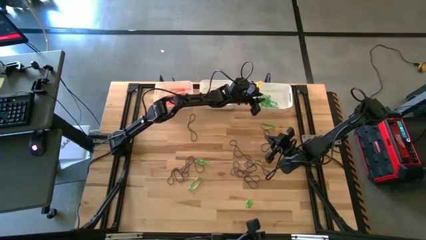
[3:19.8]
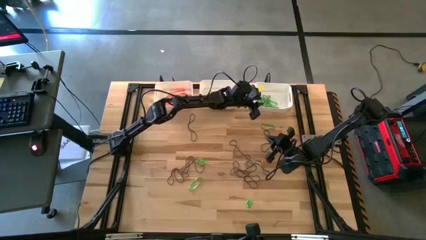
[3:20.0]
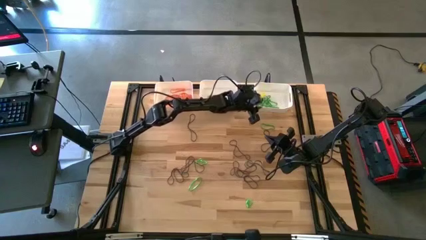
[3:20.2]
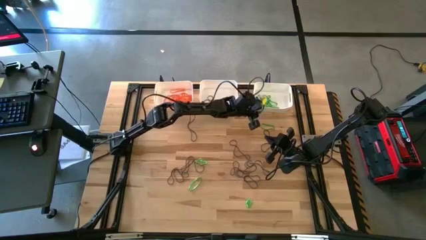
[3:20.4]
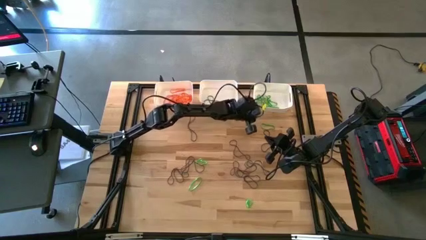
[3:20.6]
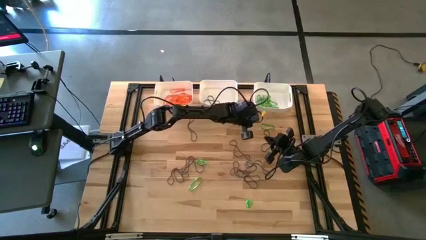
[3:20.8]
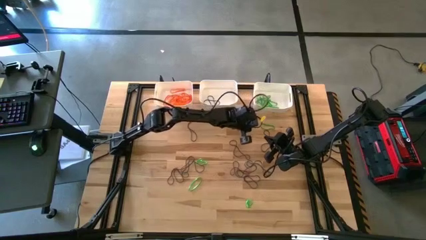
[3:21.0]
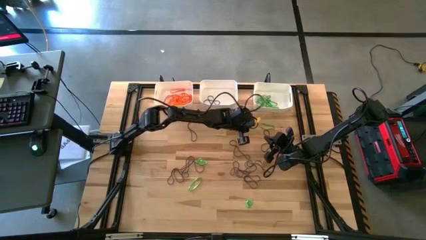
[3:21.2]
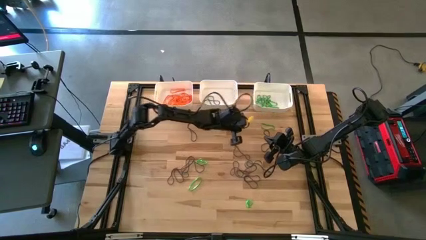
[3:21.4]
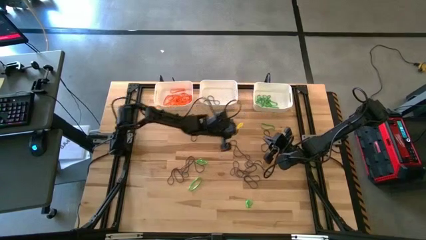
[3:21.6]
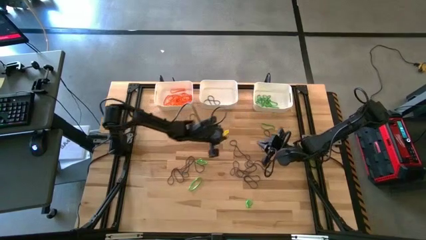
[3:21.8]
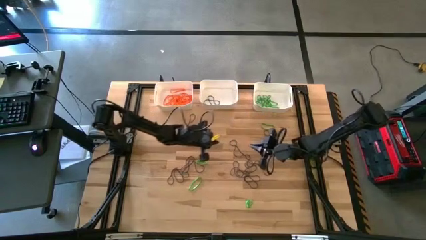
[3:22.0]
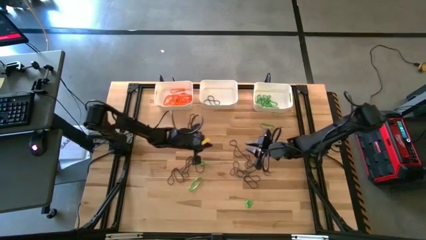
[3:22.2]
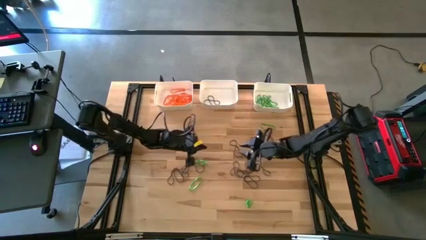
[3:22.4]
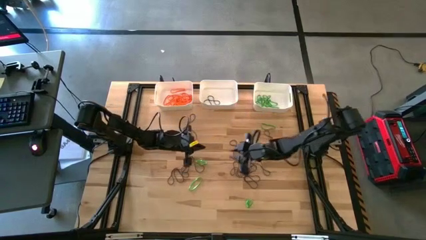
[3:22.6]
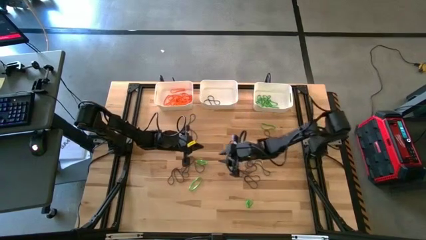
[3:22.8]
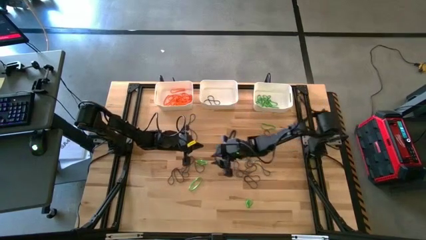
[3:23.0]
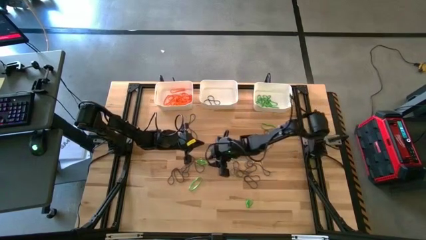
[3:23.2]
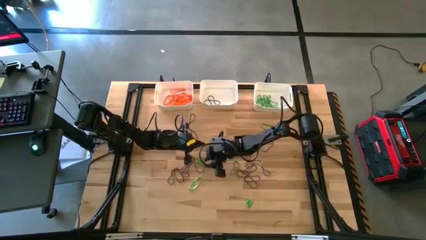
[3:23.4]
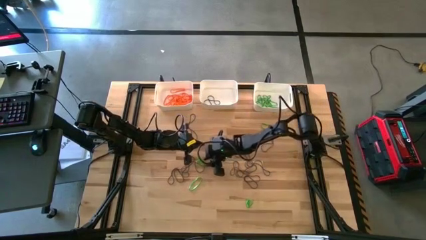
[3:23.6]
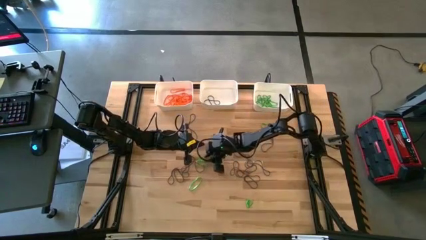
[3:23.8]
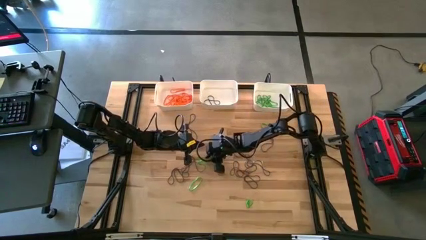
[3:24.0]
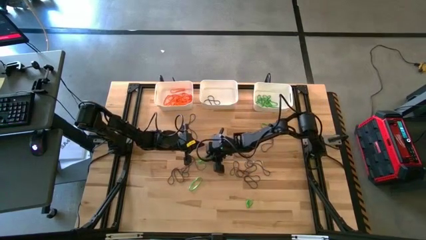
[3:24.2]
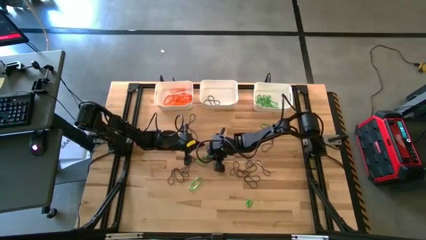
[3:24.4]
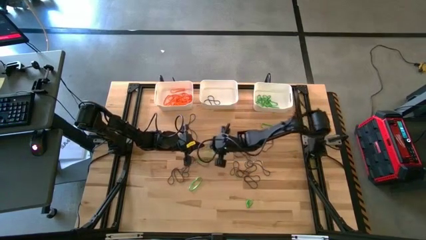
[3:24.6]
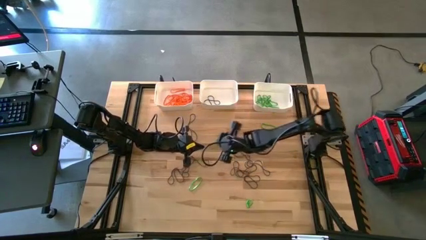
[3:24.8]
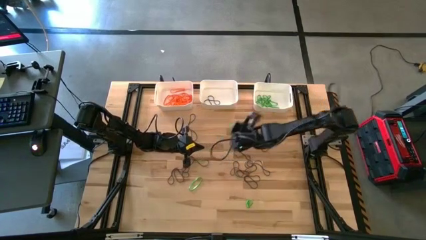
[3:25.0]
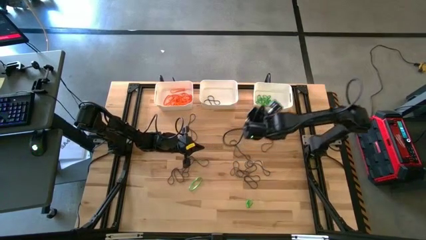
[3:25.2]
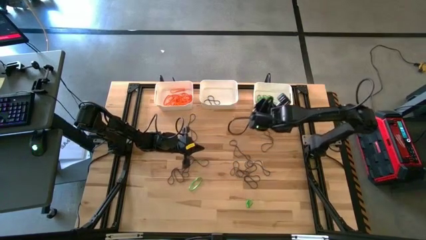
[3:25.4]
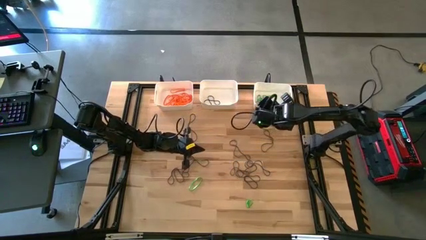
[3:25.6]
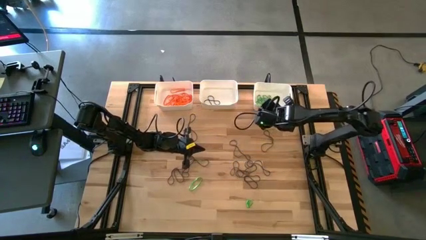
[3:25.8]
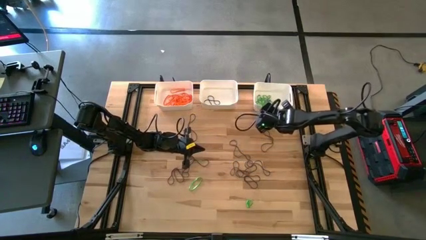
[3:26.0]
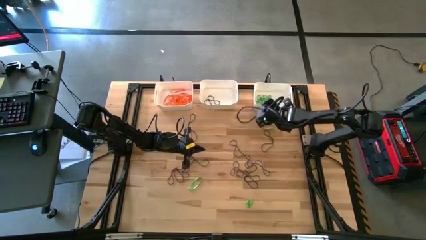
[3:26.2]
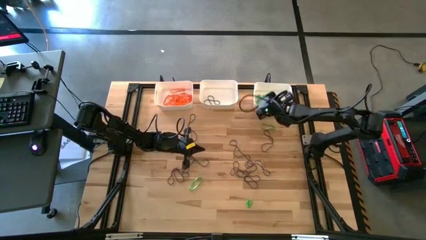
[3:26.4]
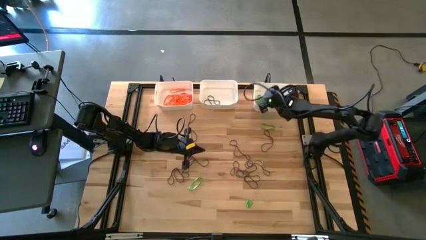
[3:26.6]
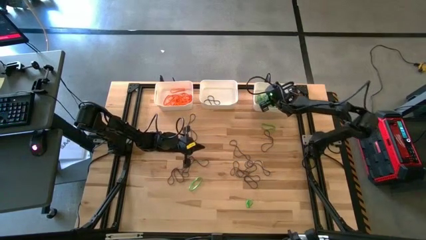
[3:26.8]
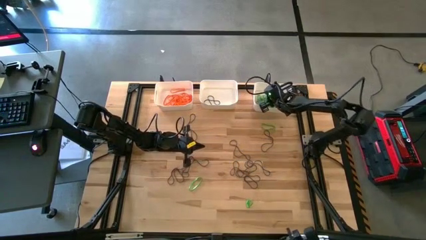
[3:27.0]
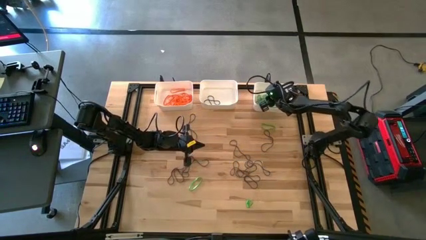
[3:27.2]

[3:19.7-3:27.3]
Task: Sort rubber bands into baskets
Put the green rubber band into the right white bin

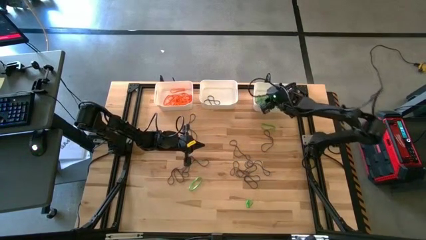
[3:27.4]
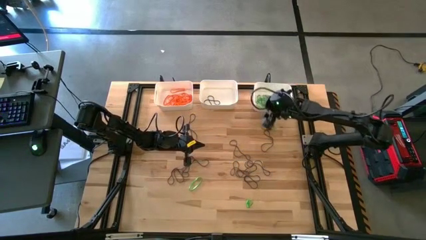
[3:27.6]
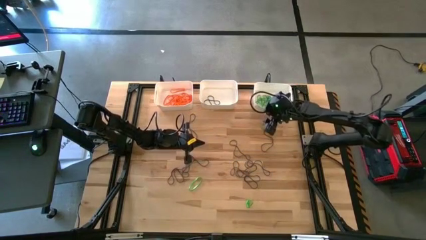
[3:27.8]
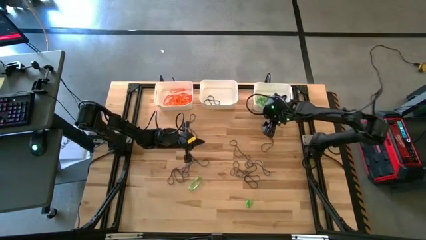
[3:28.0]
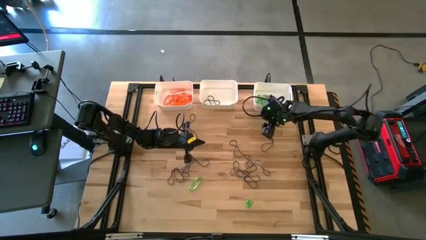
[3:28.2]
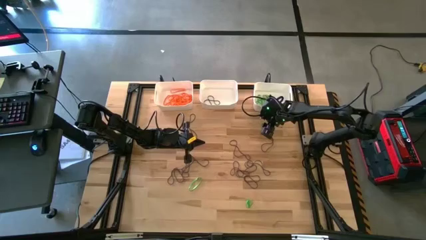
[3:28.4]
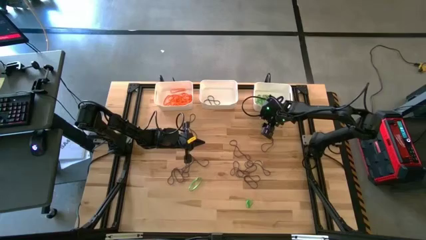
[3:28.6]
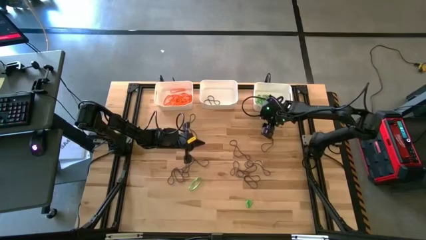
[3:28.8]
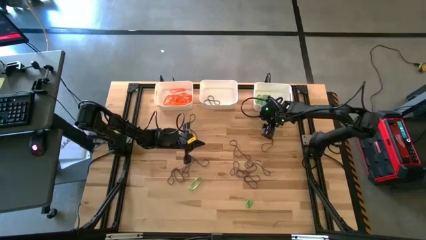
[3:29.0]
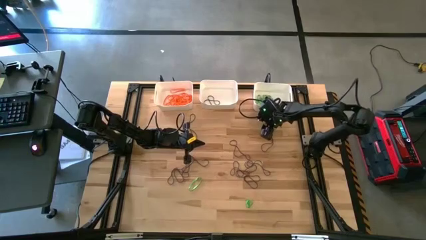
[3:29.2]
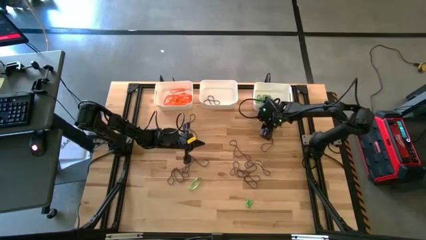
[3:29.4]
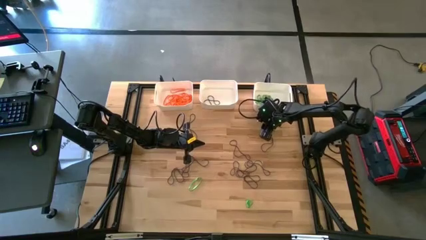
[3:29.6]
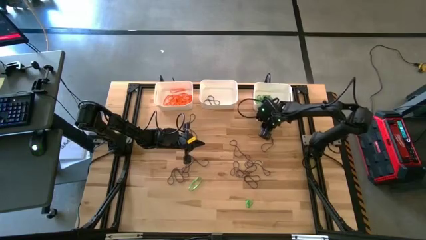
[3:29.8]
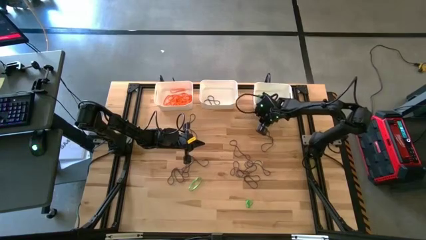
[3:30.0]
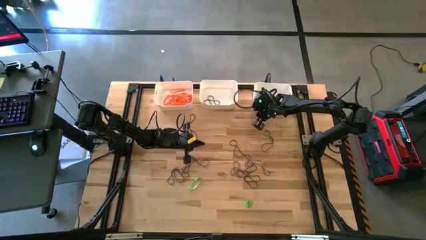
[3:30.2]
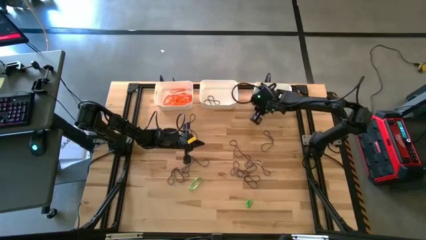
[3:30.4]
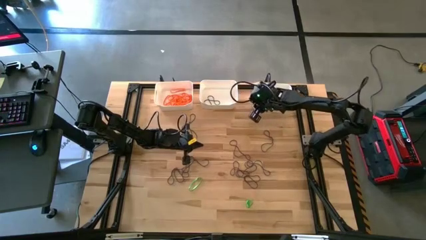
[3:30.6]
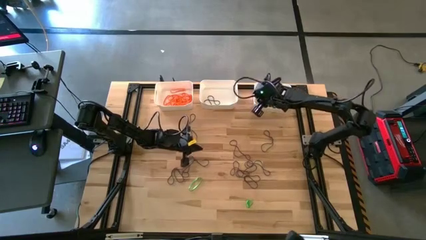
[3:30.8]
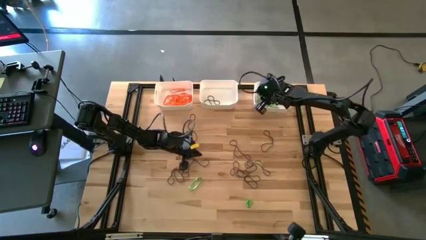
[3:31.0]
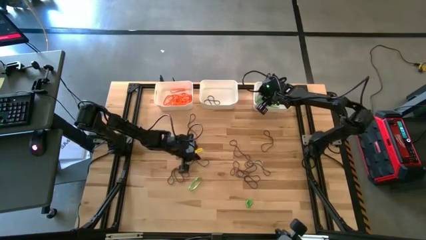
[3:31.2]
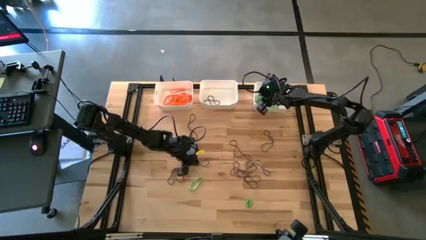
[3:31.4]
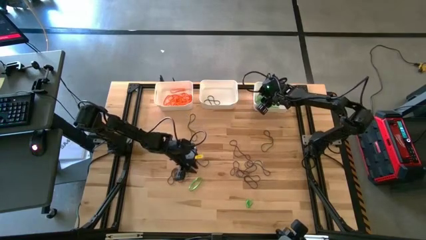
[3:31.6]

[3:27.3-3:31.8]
Put the green rubber band into the right white bin

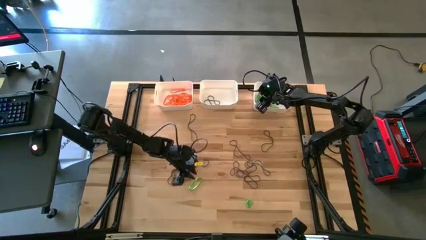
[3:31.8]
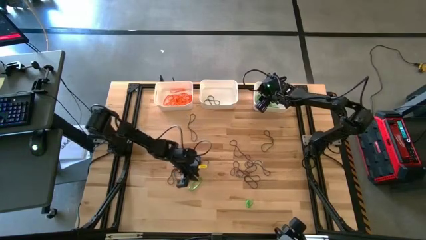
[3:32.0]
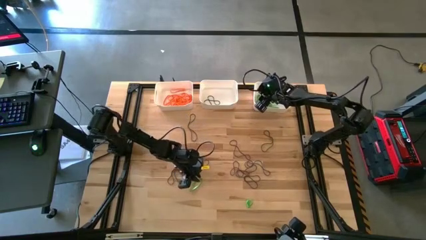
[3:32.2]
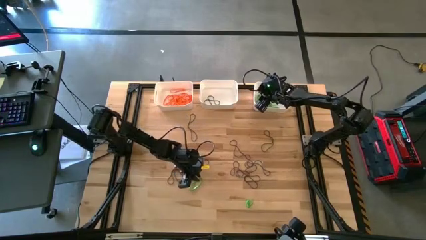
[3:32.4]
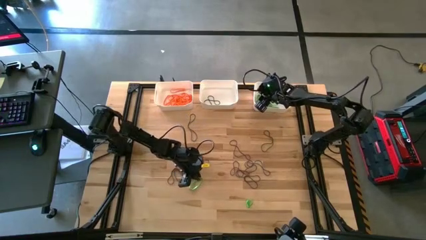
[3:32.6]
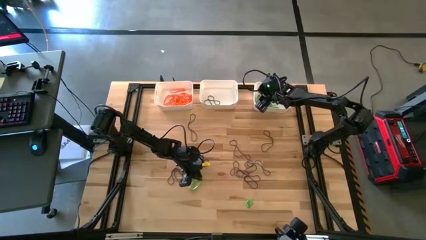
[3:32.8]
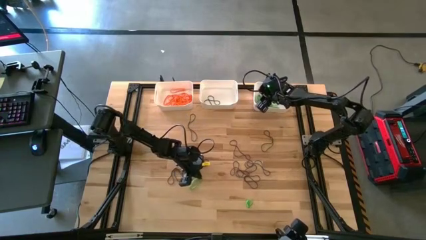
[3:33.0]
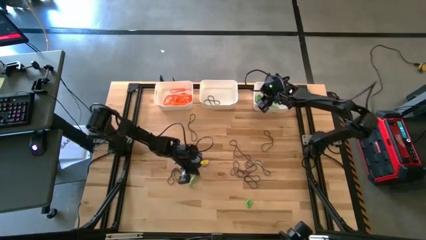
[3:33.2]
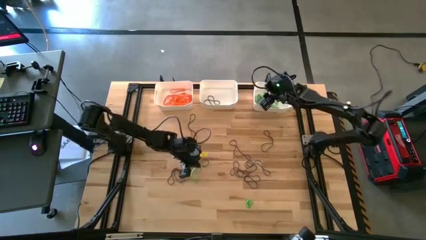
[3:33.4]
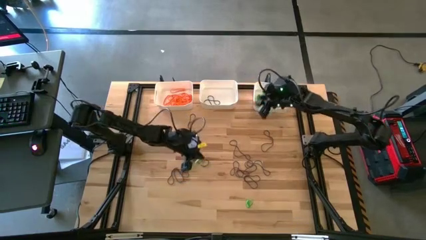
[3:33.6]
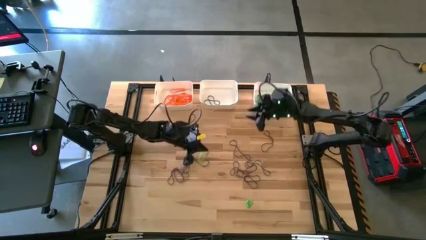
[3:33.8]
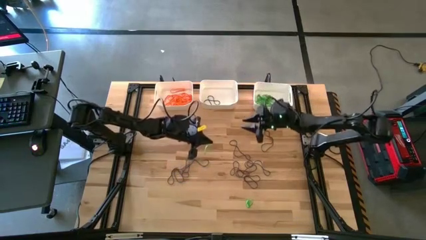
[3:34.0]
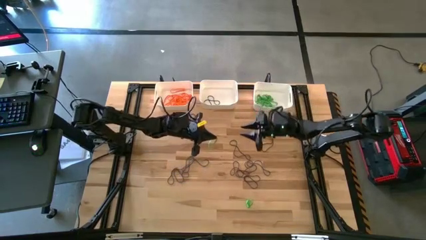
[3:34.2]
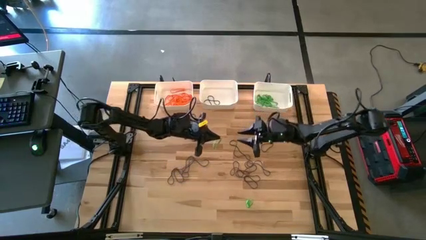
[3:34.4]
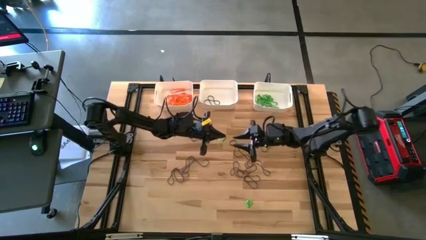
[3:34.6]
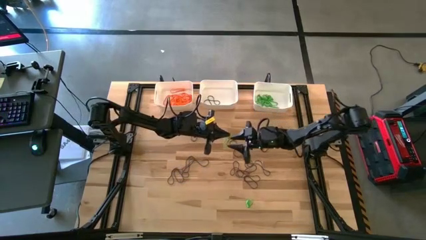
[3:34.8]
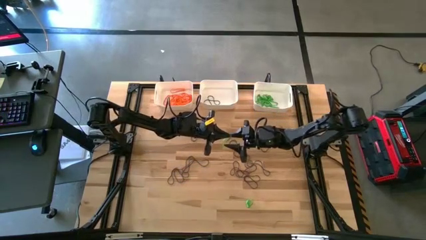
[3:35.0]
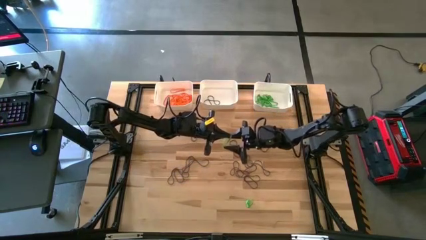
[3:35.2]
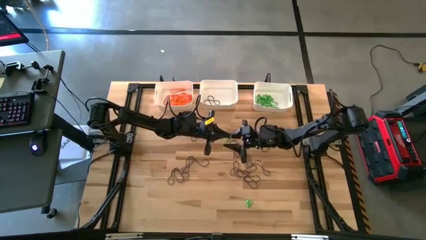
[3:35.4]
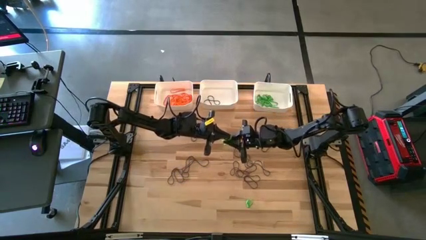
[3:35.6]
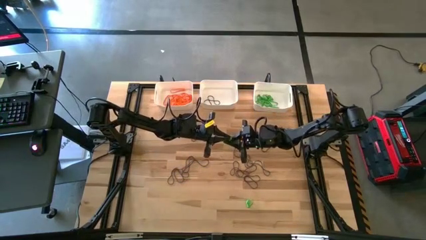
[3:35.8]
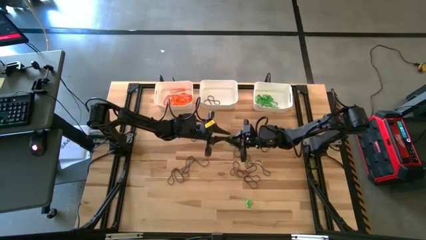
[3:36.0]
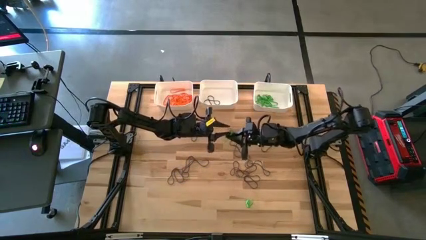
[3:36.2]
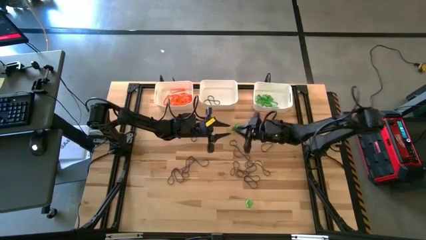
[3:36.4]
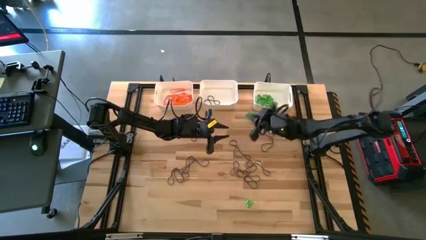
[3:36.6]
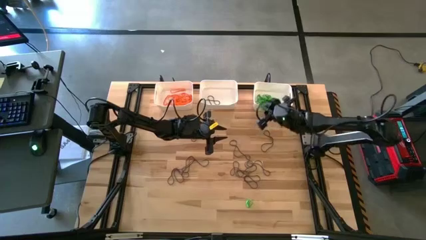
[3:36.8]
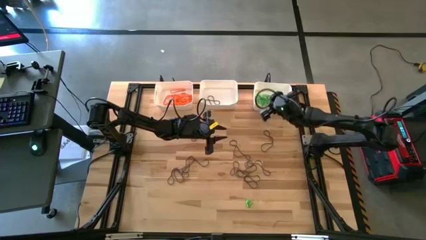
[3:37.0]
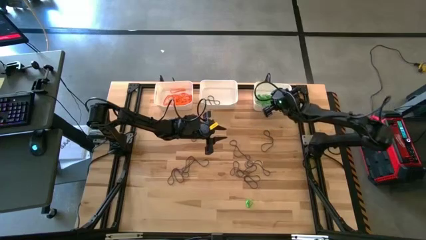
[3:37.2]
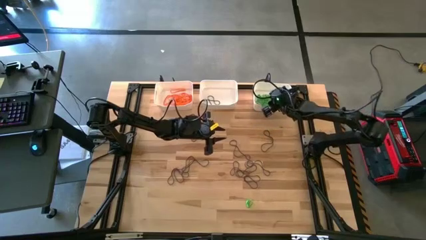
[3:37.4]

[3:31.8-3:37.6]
Put the green rubber band into the right white bin
